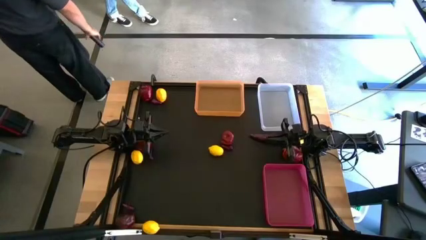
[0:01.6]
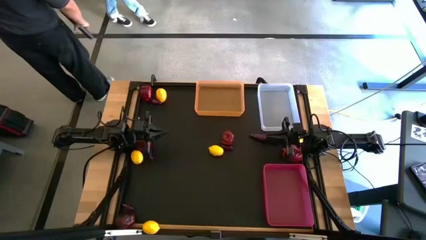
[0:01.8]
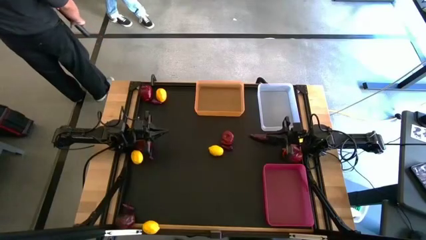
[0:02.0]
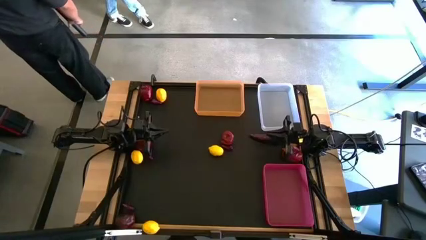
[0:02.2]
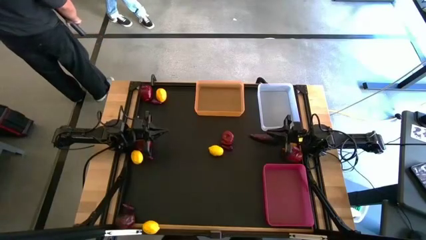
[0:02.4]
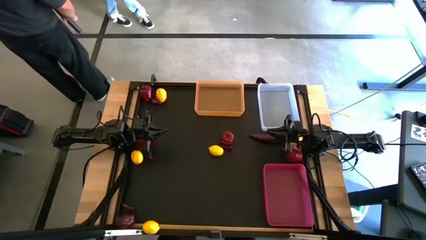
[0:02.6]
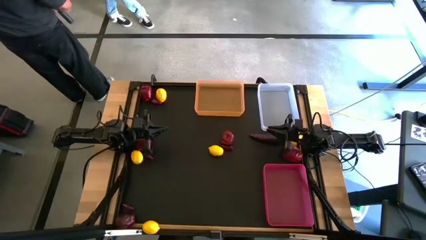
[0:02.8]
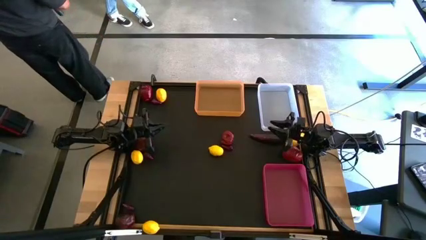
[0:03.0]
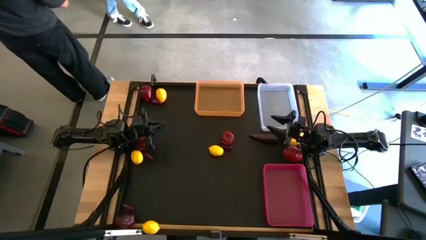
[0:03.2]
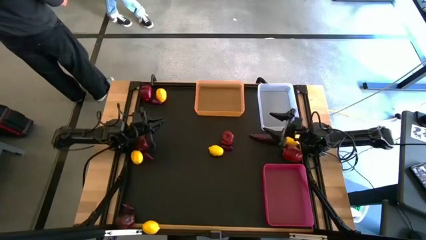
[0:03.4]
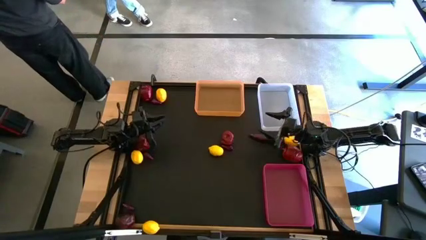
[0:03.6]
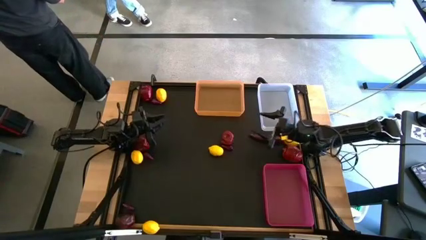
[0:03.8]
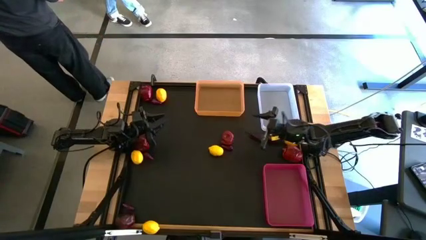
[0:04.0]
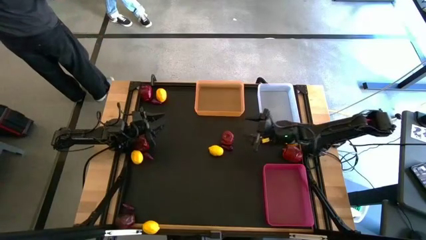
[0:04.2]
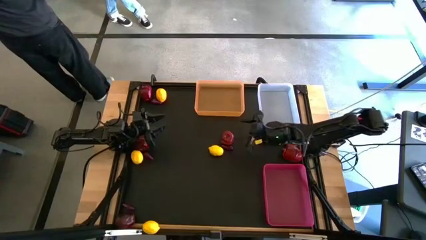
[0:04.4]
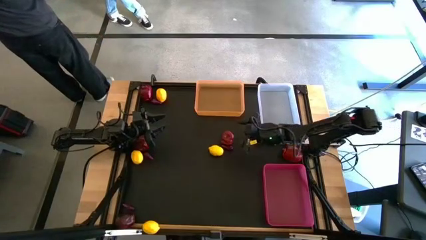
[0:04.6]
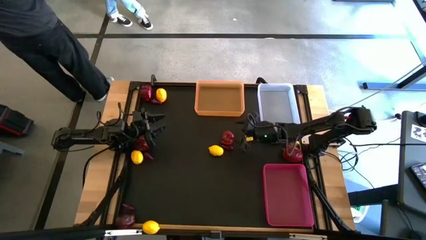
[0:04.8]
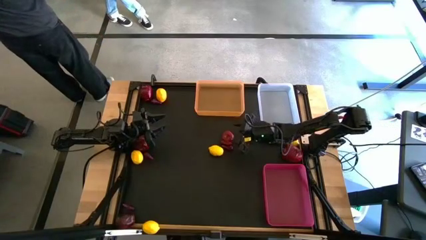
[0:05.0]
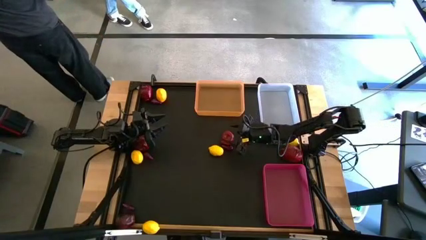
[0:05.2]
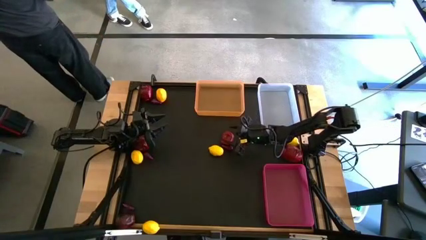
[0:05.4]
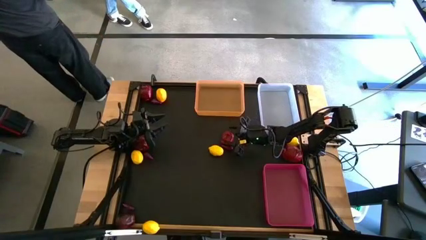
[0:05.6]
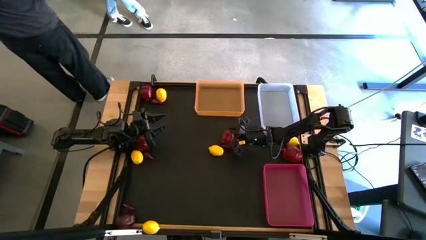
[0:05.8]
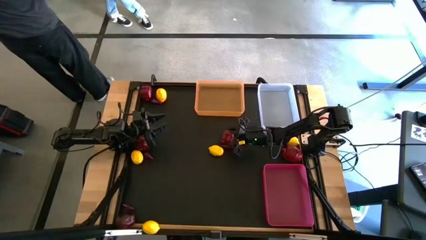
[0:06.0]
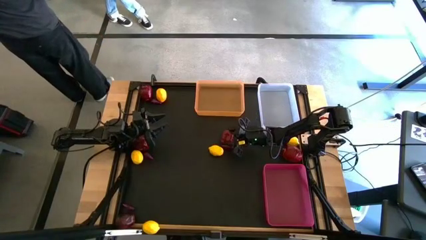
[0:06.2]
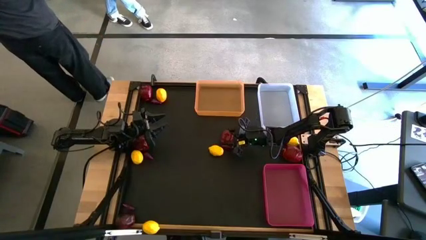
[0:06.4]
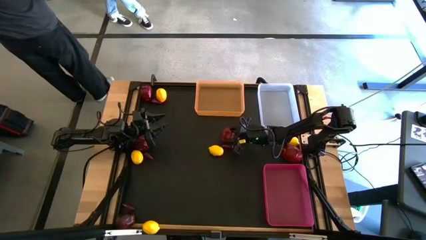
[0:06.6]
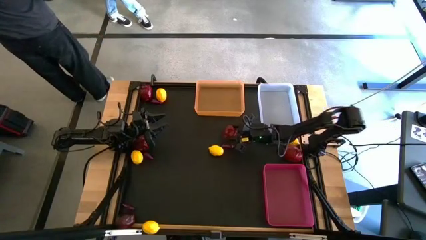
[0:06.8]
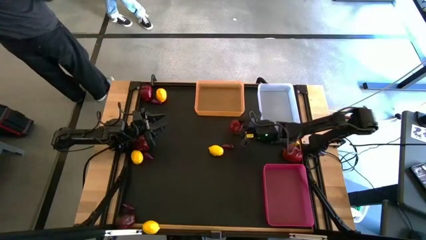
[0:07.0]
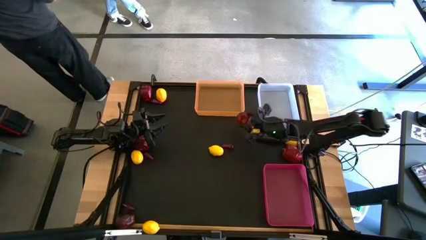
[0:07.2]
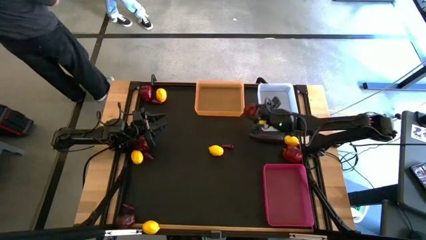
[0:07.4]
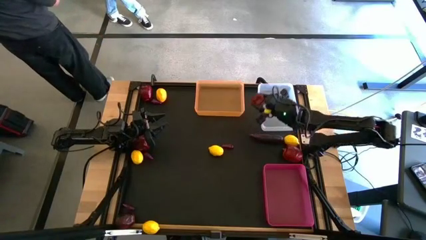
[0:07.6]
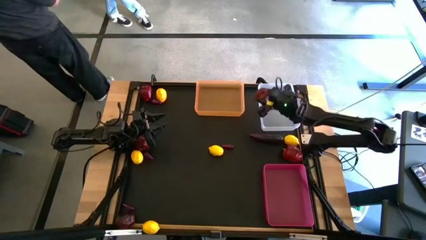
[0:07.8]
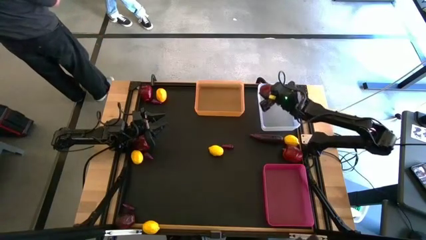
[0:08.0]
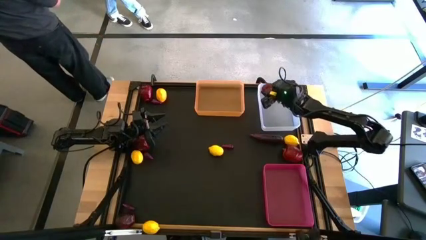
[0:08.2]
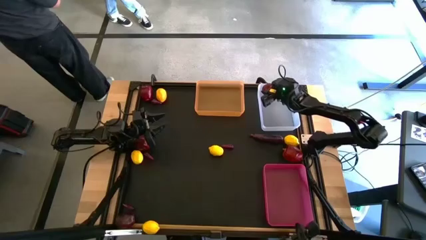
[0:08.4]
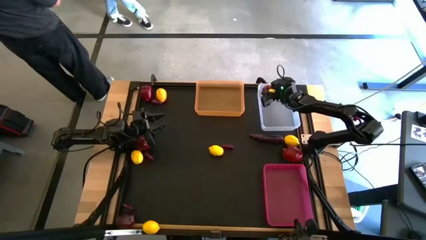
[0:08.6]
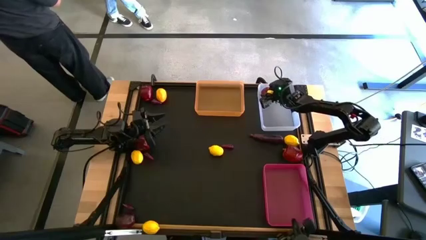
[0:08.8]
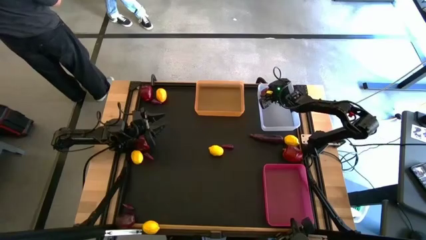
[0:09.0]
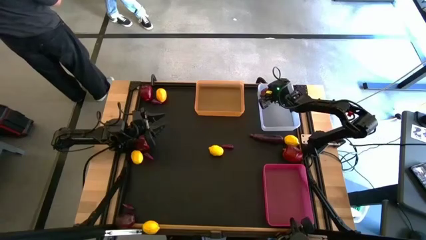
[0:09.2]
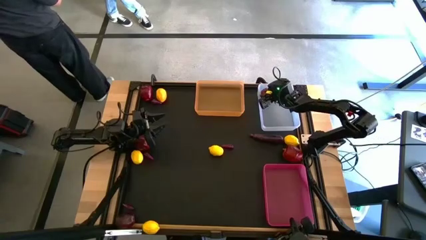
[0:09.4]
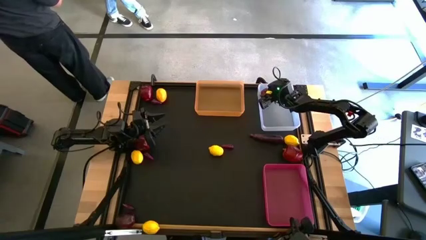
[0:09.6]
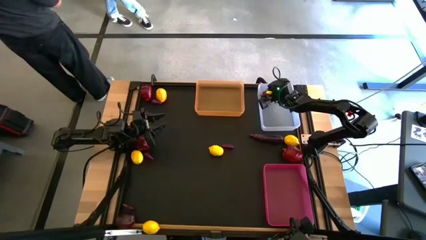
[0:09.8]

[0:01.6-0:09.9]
Task: Sort produce into baskets
Put the red apple into the white bin

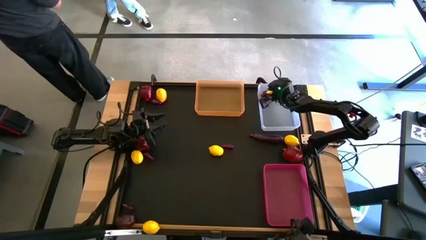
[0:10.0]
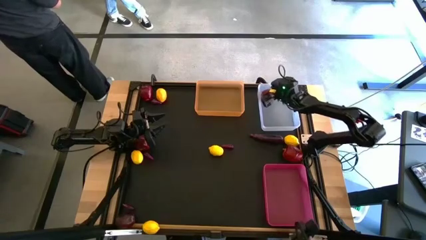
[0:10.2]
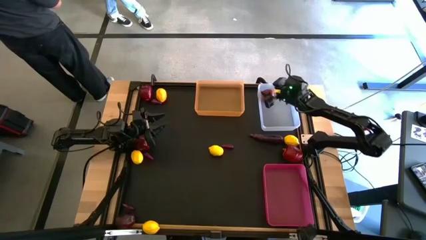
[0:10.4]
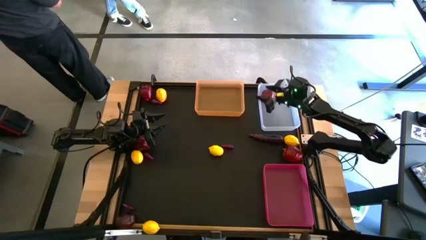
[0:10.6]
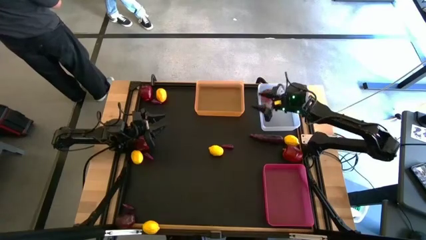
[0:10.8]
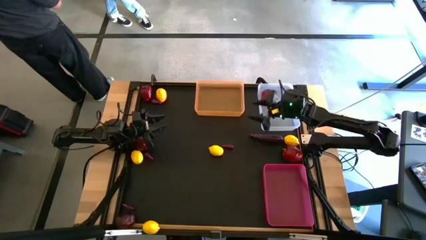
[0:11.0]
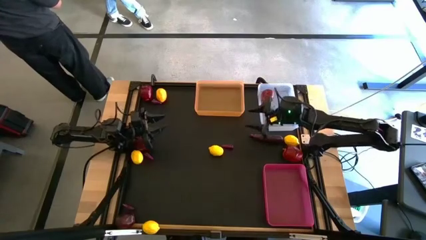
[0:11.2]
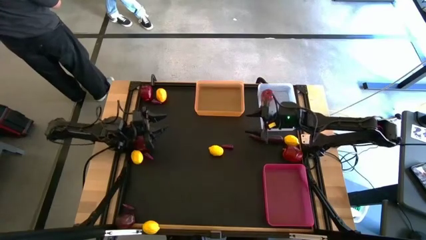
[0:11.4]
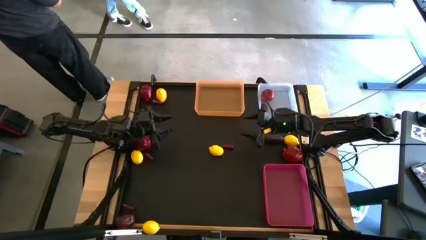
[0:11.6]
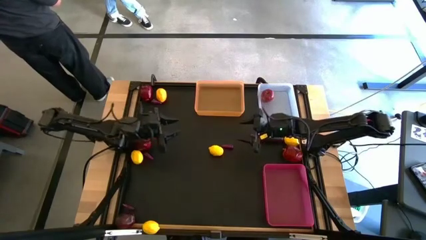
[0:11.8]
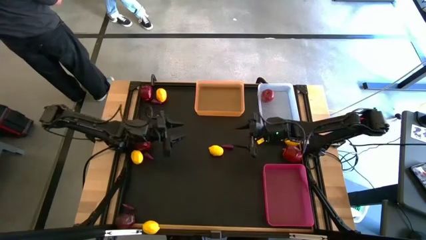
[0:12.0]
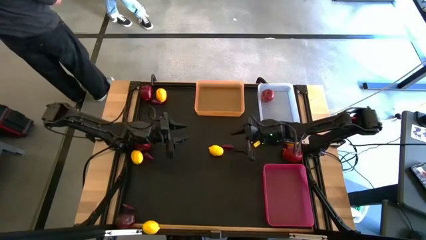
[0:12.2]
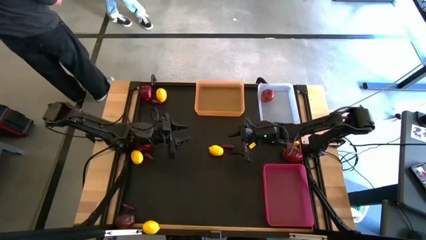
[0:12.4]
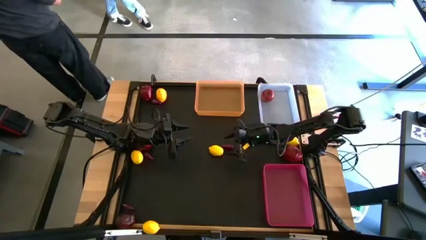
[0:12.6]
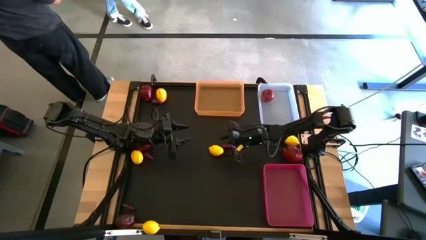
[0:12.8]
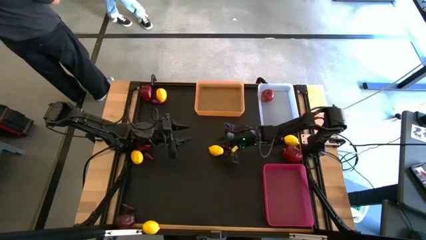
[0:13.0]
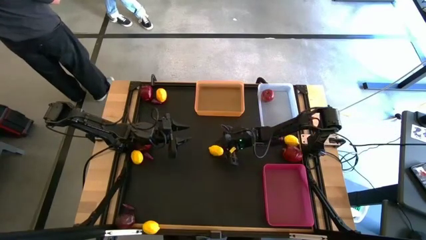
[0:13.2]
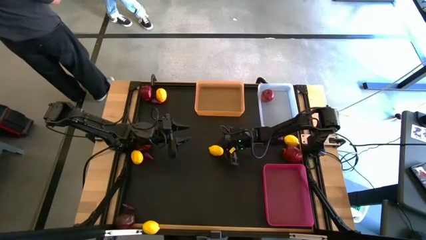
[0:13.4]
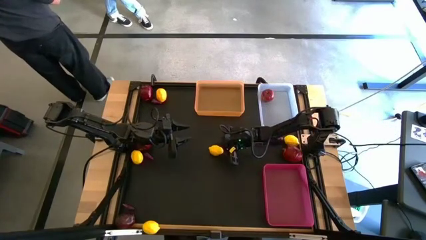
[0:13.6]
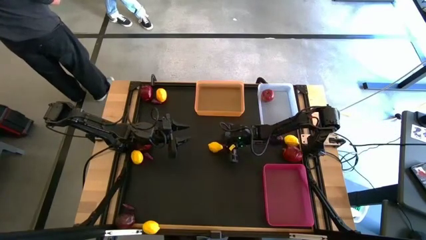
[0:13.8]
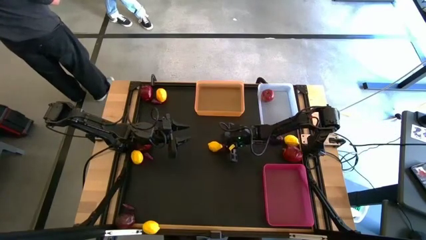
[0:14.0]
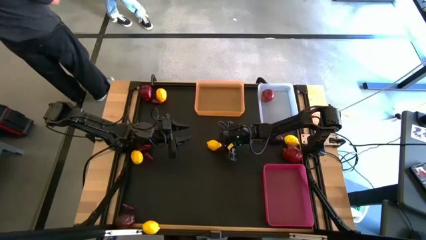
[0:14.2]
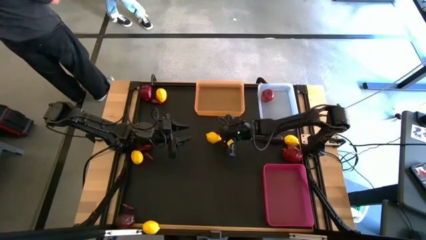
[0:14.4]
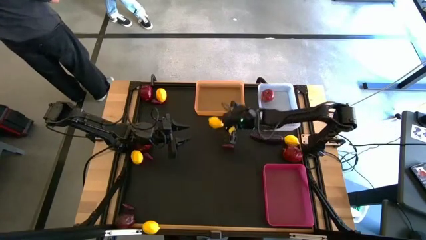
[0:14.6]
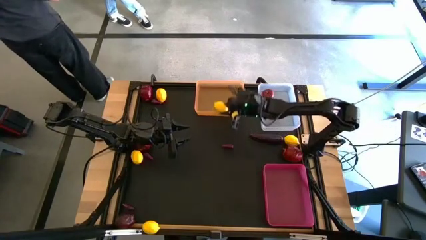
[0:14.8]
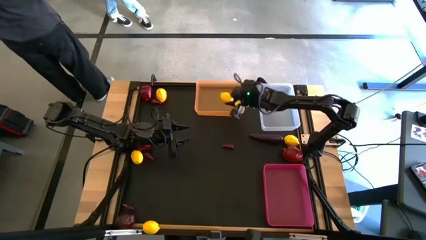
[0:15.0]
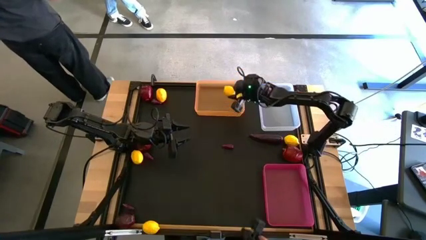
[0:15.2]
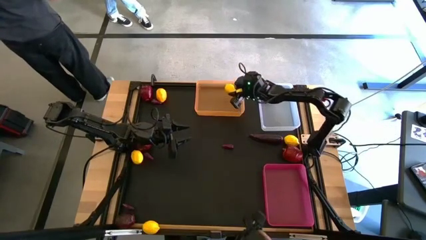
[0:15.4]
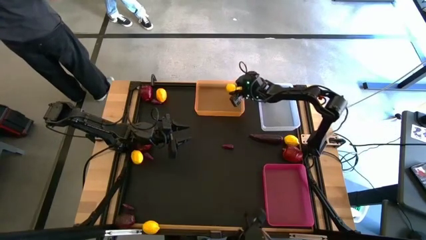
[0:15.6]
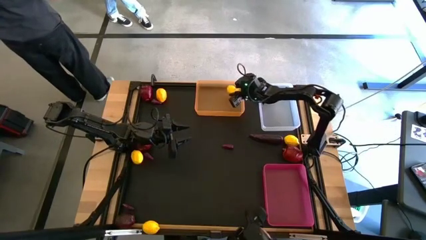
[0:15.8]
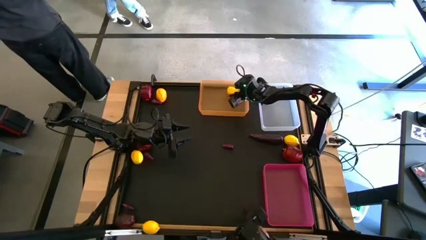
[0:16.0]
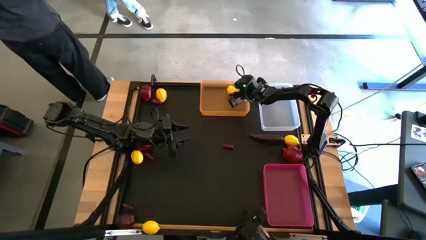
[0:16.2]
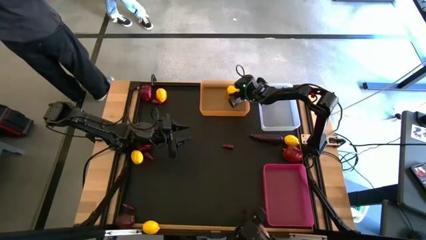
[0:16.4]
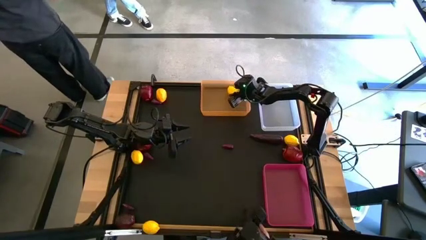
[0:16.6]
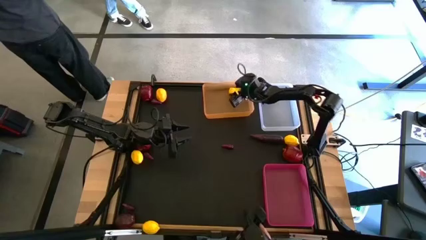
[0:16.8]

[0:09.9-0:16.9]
Put the yellow lemon into the orange bin

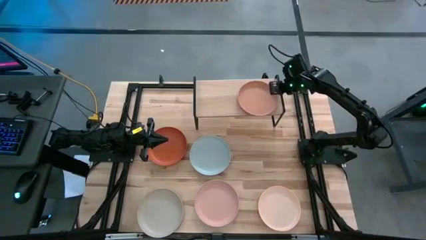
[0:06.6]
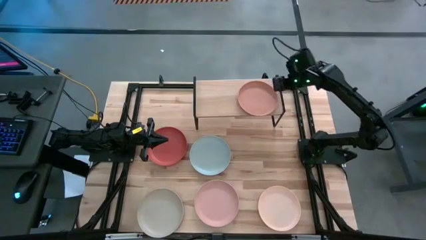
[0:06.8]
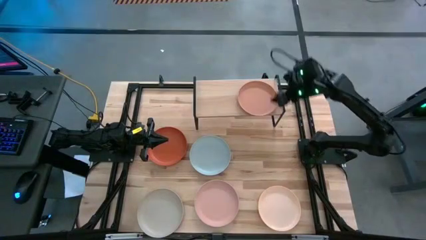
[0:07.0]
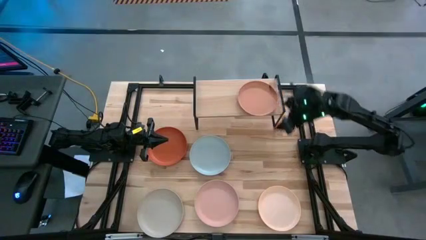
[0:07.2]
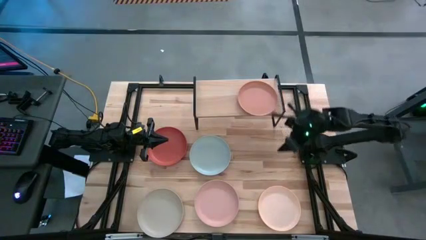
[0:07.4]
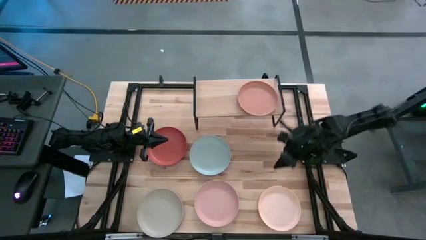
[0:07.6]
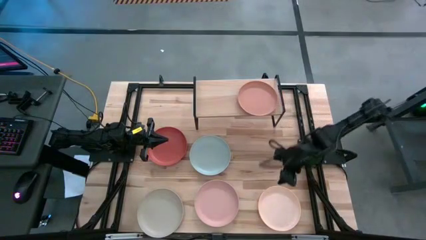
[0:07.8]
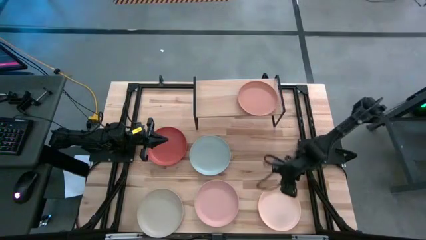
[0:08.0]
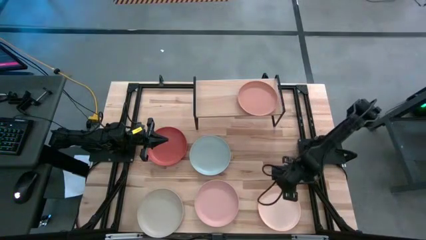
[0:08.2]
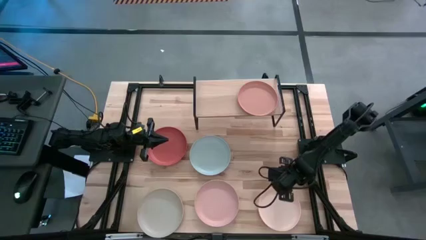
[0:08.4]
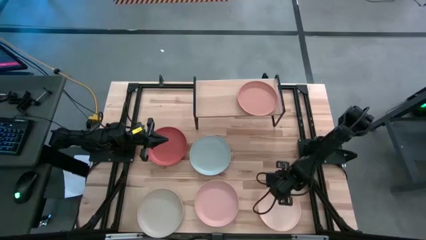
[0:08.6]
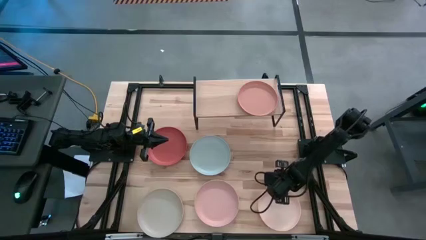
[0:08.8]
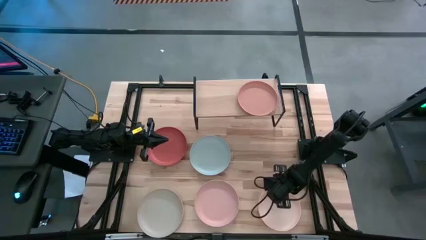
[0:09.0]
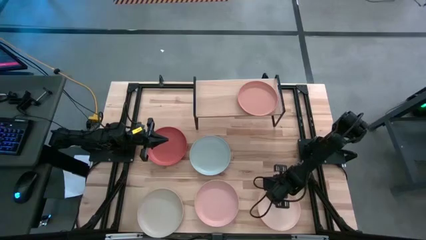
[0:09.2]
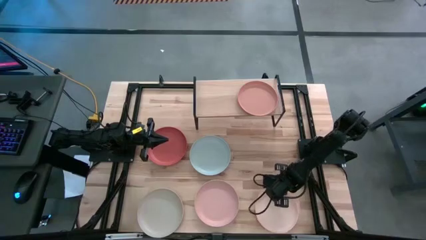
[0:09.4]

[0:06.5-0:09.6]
Task: Place and stack plates onto a shelf
Stack the white plate into the brown plate
